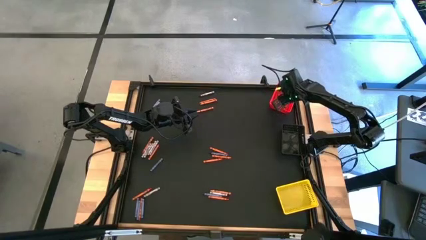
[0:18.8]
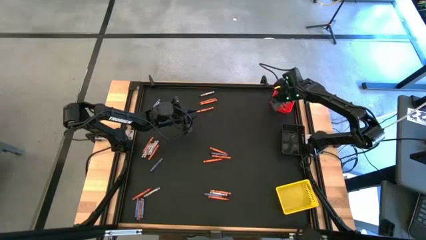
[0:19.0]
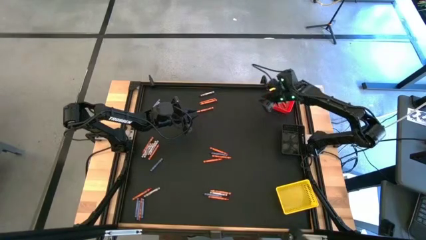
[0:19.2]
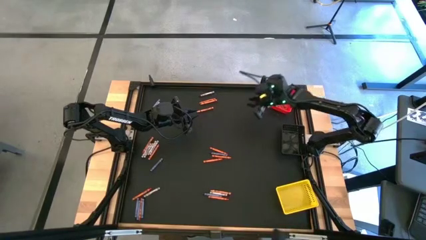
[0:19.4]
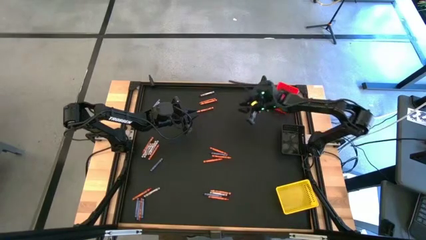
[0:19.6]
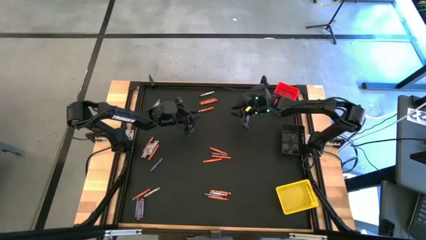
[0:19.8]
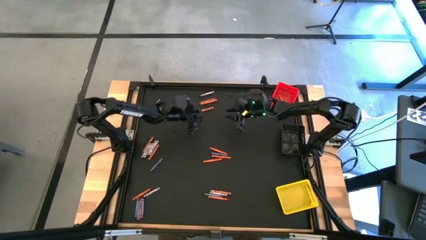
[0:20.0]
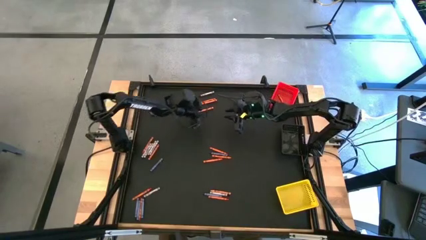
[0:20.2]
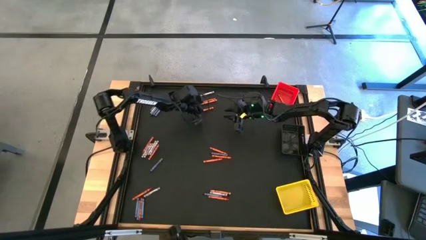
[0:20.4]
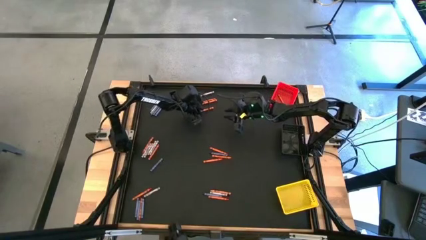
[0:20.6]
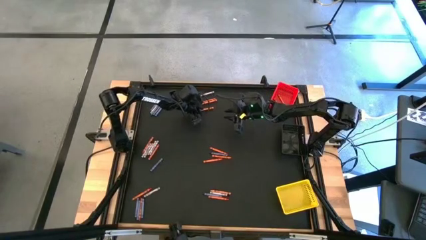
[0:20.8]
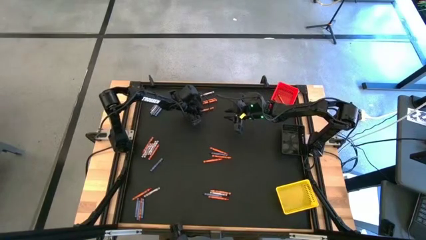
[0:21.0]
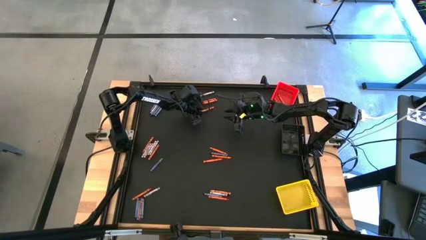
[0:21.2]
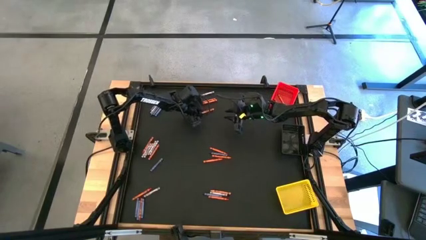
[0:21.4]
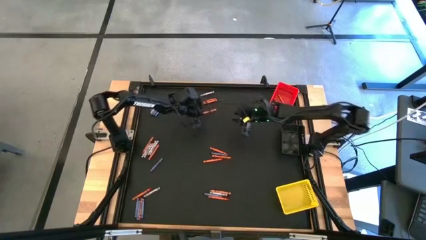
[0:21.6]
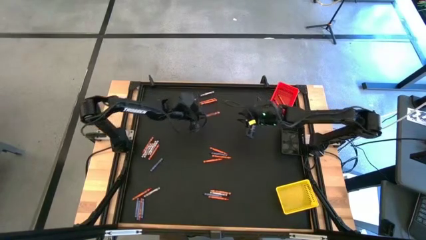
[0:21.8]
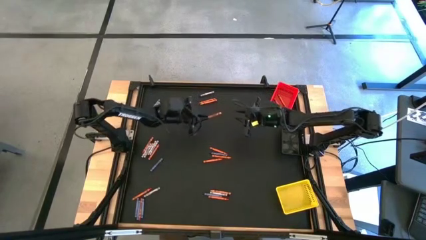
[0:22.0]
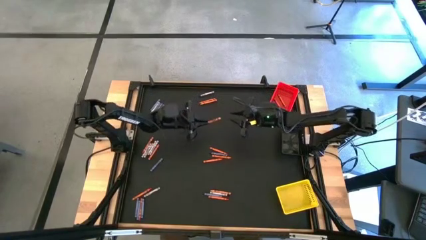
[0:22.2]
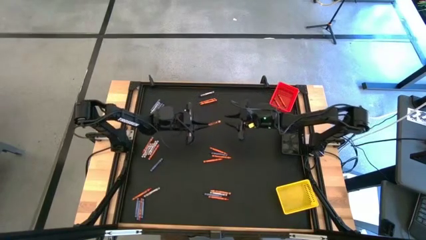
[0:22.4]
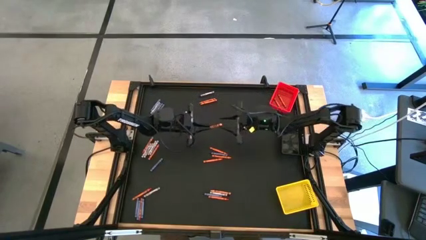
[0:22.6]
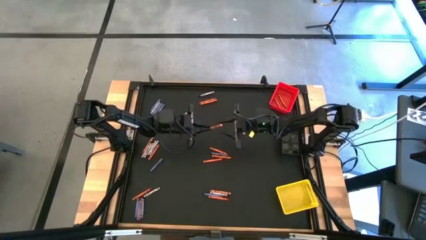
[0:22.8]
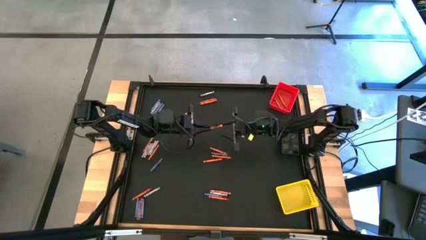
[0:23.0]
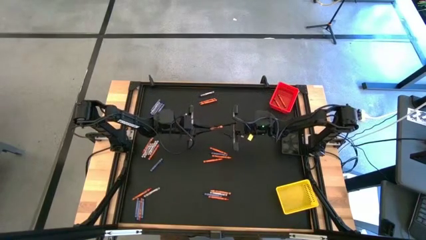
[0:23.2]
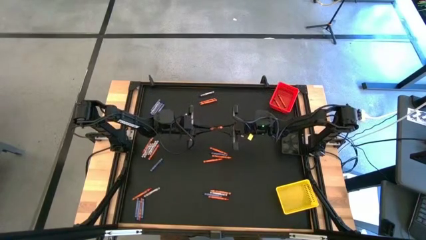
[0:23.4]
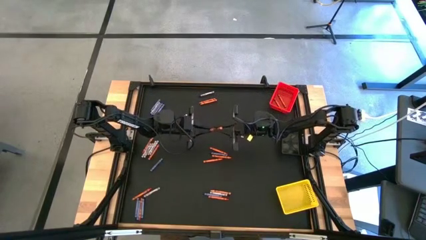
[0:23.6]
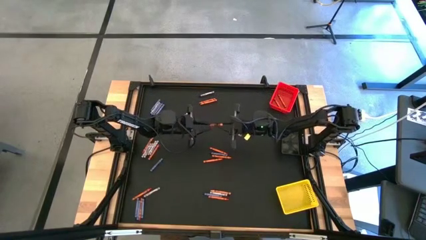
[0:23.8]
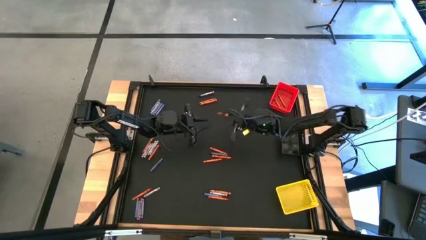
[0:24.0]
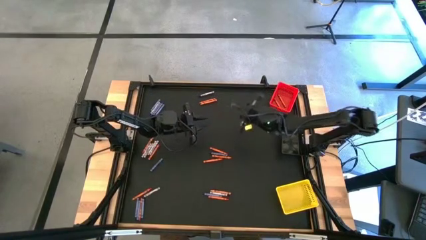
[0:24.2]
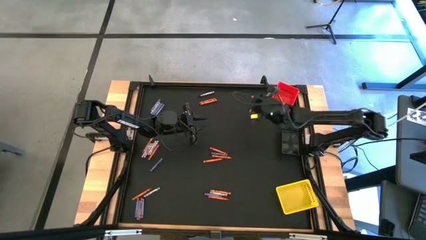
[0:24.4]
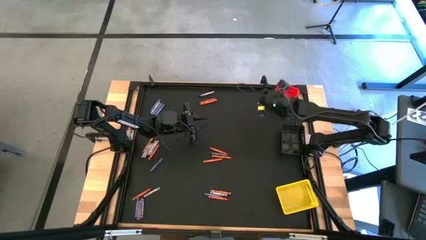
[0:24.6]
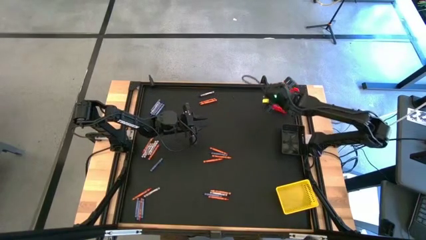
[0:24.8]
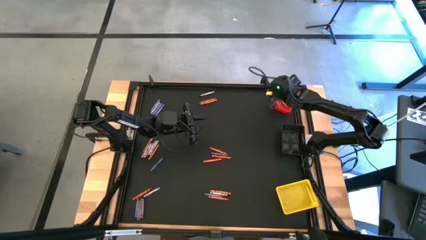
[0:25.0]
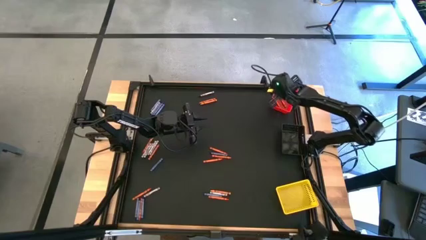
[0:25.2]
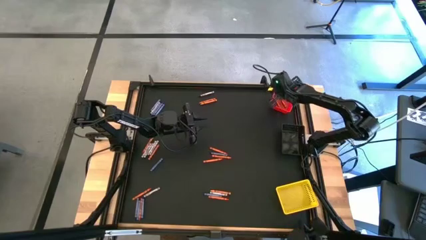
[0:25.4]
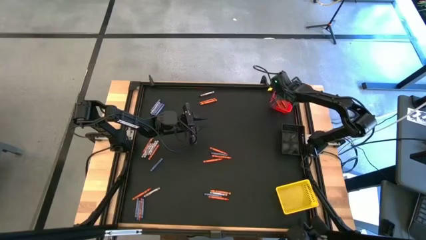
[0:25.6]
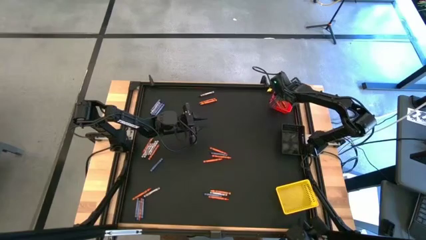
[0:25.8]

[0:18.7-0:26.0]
Task: Sort crayons
Put the orange crayon into the red bin

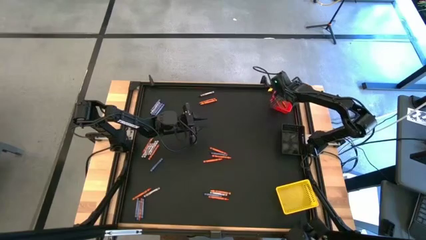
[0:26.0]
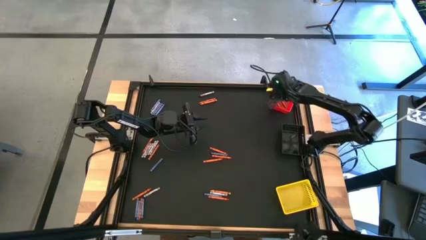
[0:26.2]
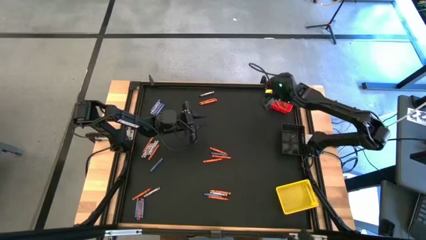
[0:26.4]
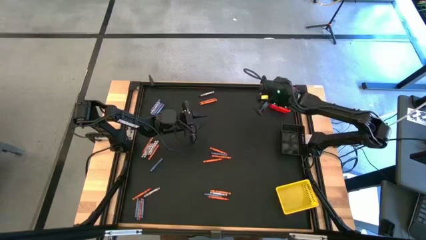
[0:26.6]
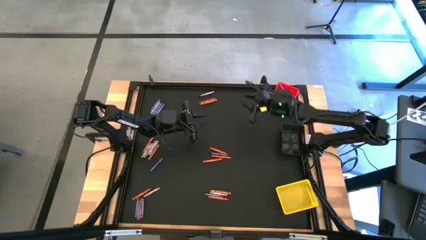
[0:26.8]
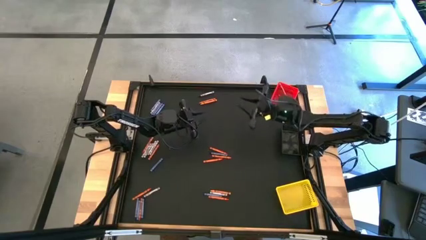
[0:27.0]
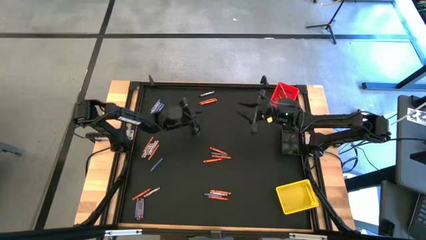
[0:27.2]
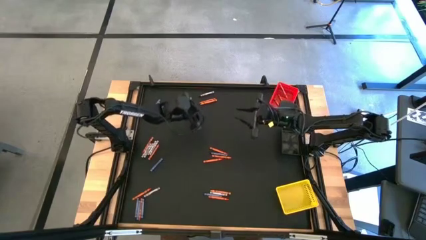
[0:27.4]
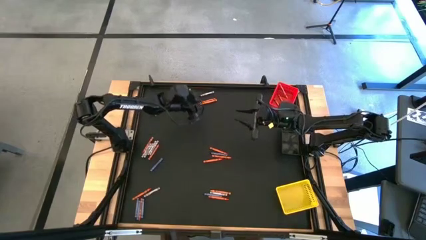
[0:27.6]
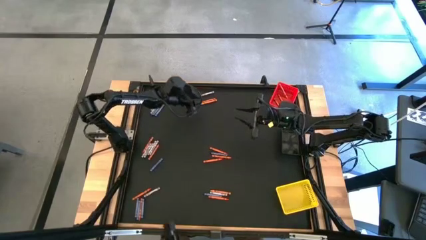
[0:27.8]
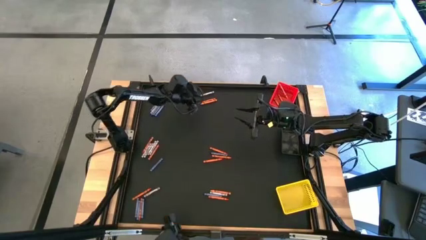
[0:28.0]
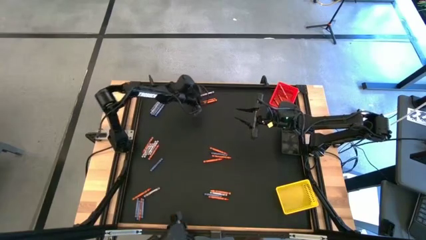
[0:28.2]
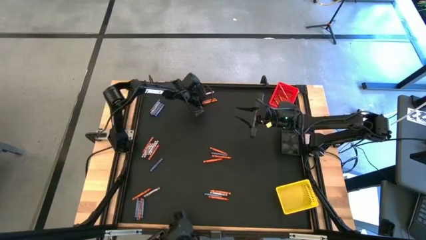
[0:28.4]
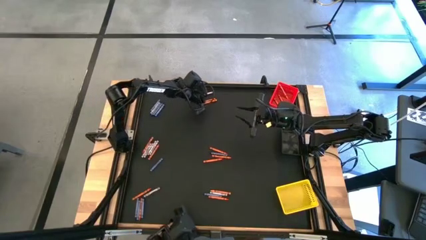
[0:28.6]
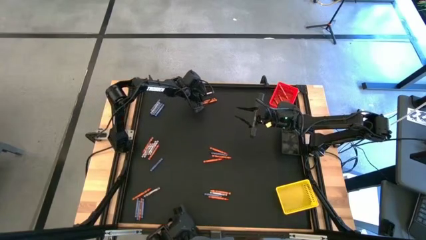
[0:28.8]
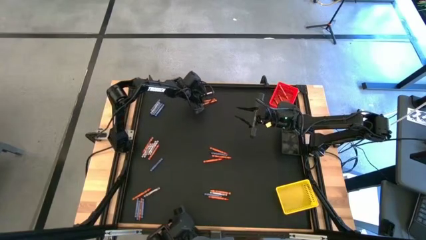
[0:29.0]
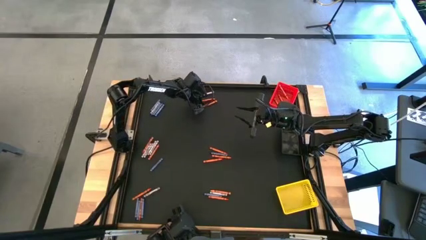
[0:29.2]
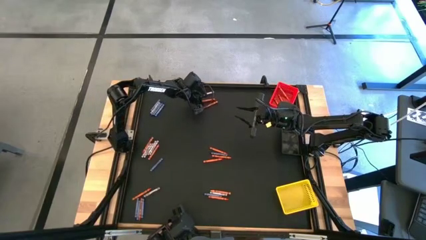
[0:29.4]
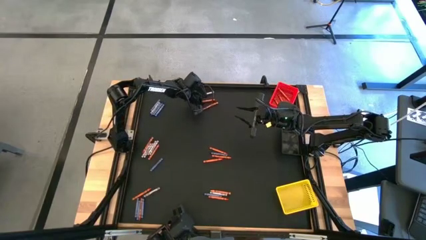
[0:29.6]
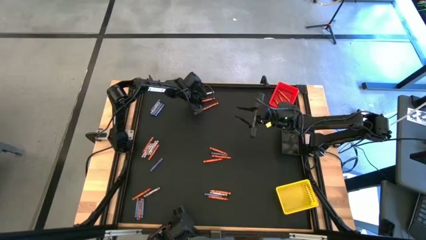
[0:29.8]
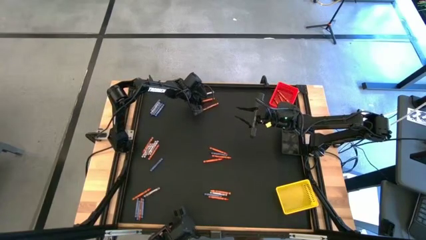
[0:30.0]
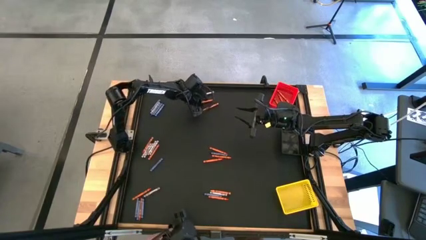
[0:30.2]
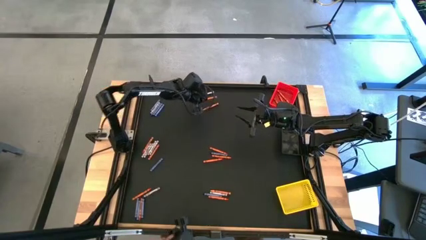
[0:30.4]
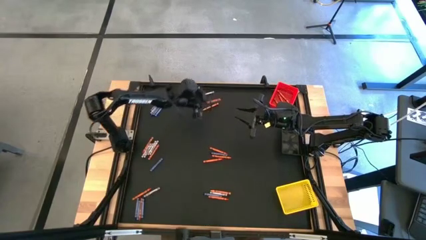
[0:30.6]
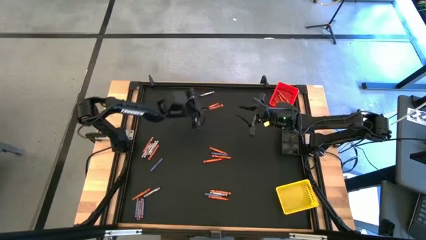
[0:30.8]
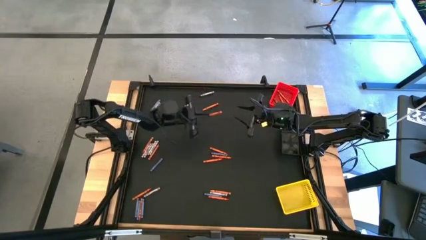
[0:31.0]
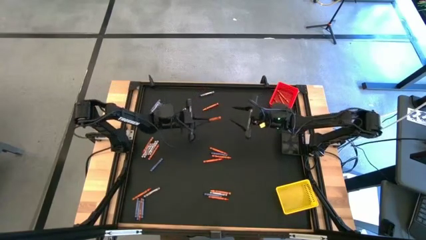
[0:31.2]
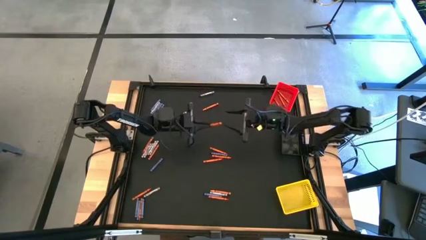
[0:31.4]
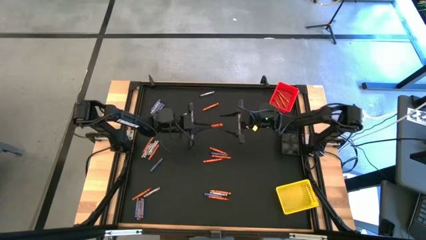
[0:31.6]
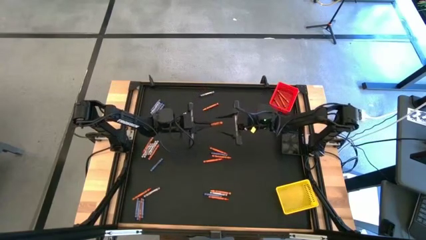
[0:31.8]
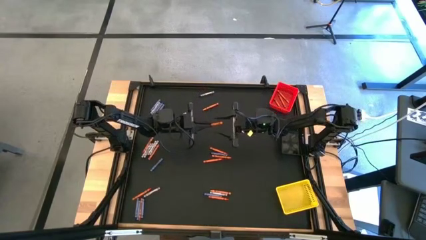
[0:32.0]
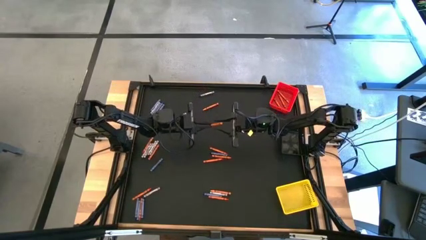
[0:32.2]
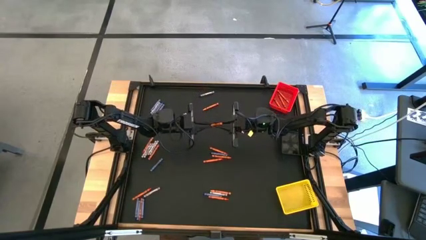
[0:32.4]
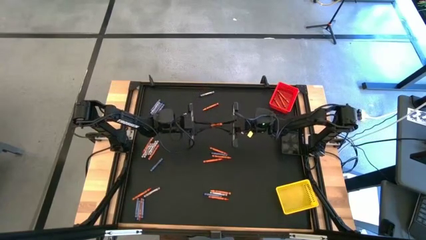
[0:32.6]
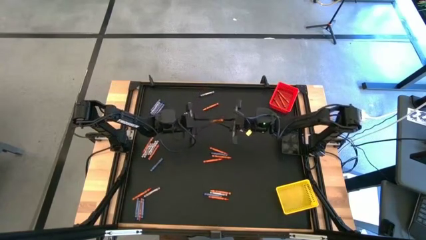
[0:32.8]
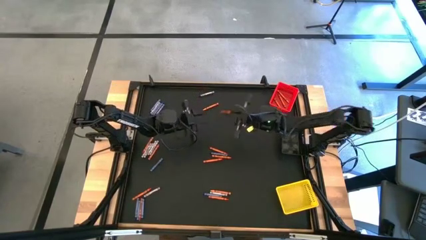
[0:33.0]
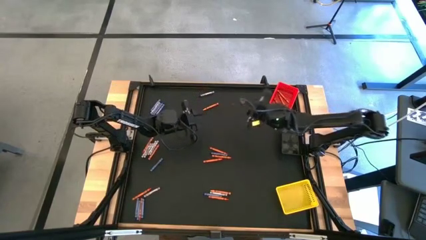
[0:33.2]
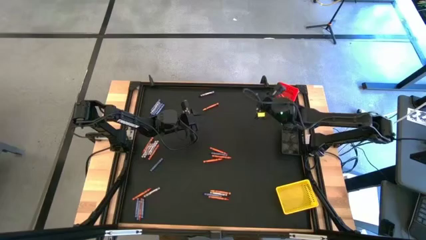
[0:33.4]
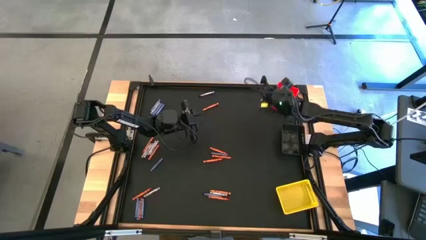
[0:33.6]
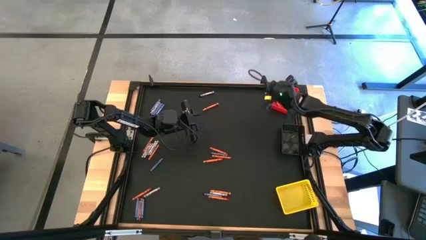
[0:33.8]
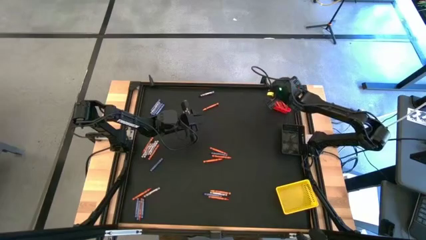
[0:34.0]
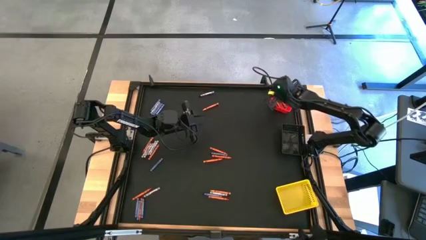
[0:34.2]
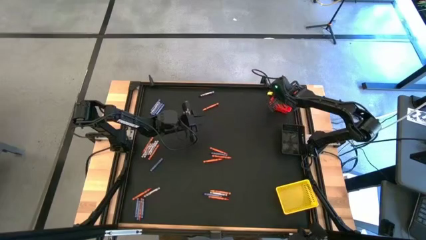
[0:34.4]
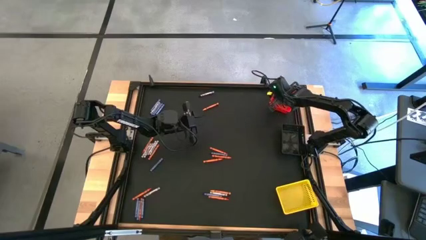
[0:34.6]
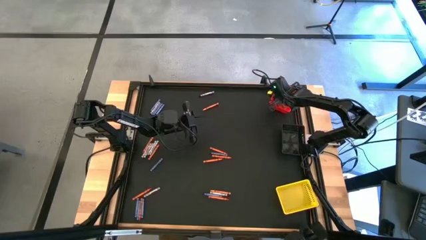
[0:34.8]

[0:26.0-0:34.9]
Put the orange crayon into the red bin
